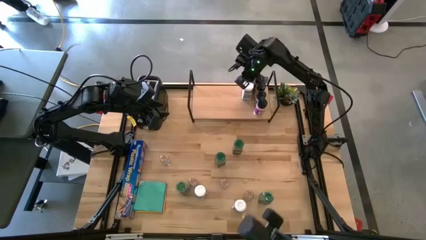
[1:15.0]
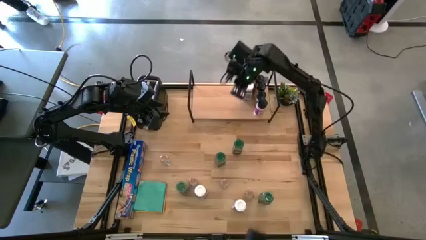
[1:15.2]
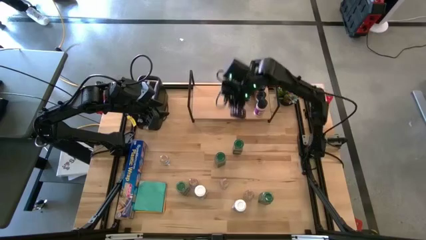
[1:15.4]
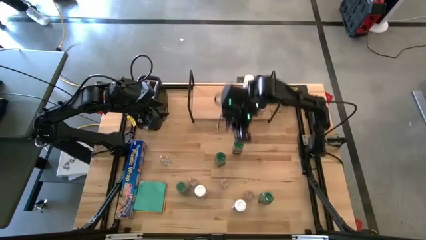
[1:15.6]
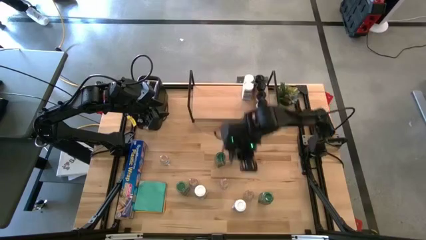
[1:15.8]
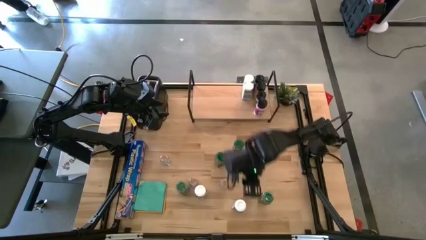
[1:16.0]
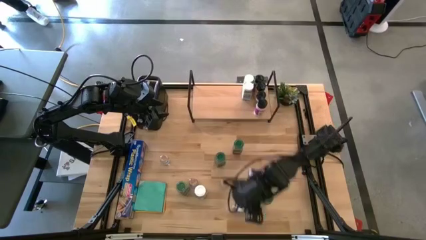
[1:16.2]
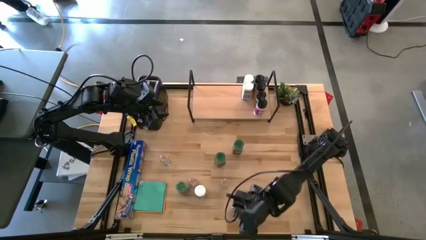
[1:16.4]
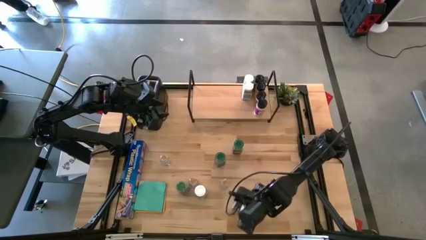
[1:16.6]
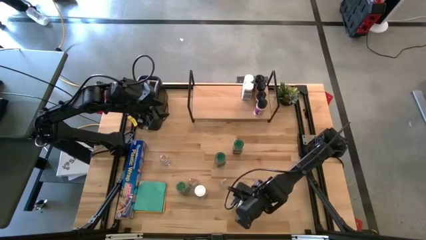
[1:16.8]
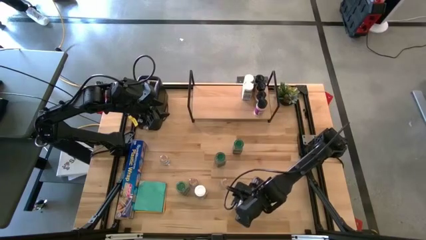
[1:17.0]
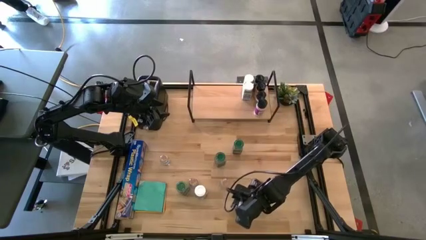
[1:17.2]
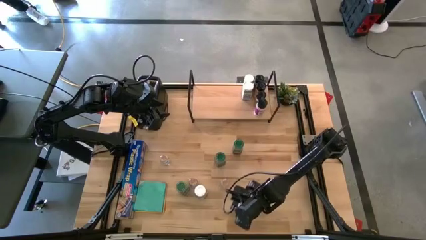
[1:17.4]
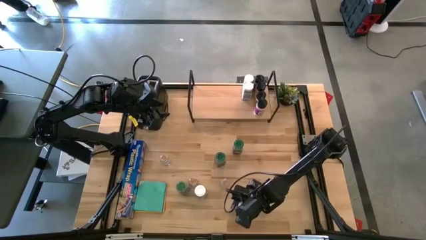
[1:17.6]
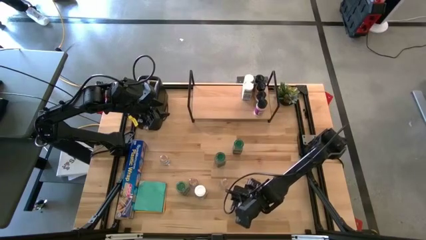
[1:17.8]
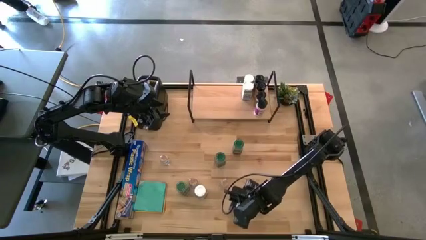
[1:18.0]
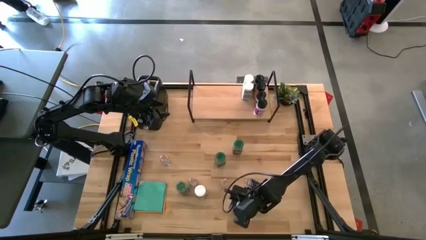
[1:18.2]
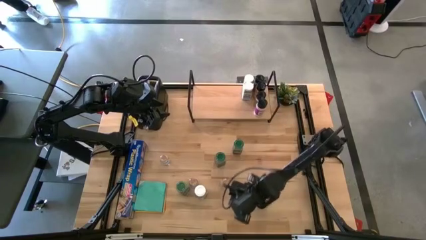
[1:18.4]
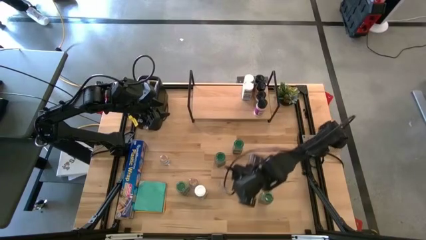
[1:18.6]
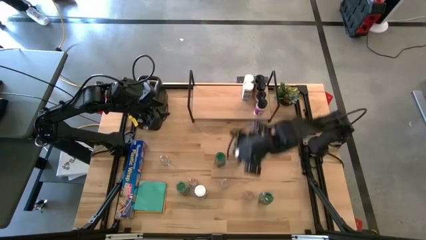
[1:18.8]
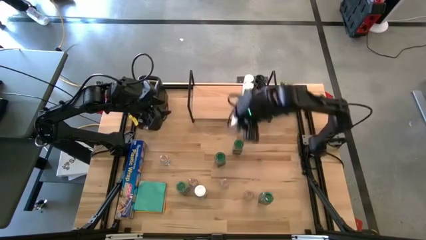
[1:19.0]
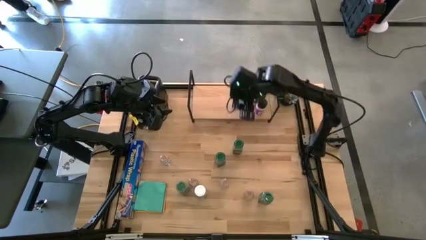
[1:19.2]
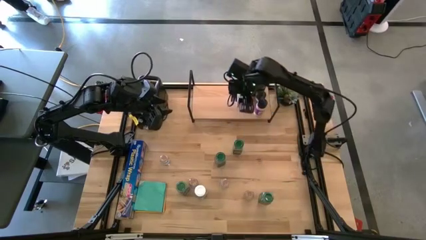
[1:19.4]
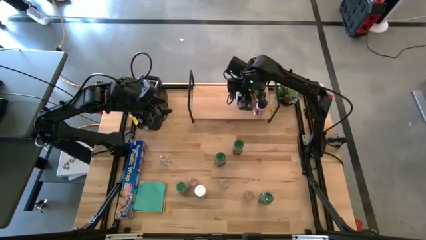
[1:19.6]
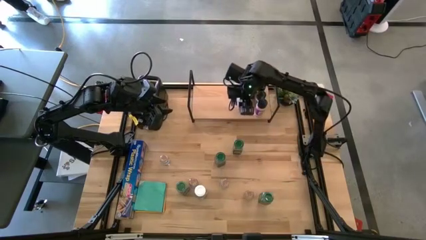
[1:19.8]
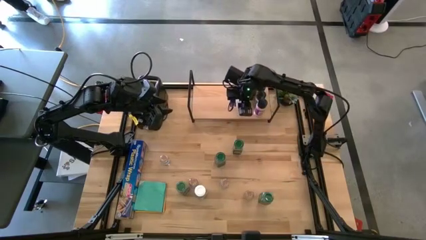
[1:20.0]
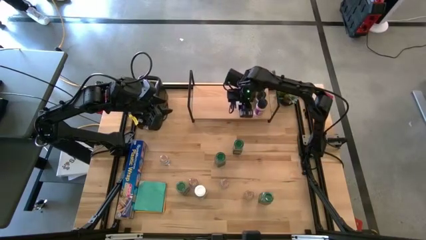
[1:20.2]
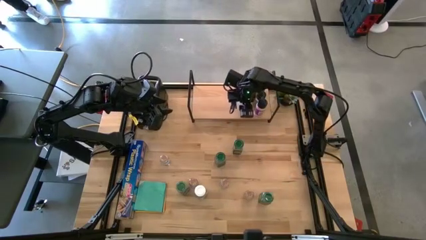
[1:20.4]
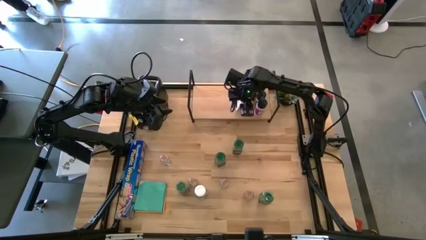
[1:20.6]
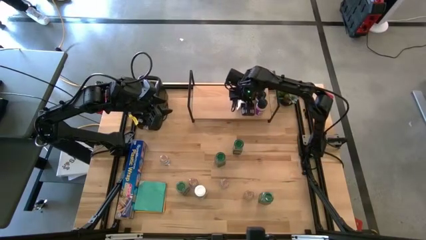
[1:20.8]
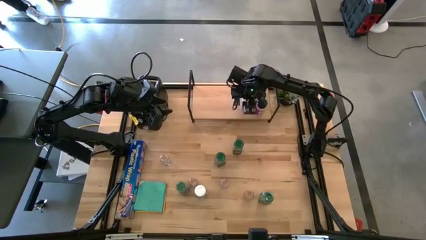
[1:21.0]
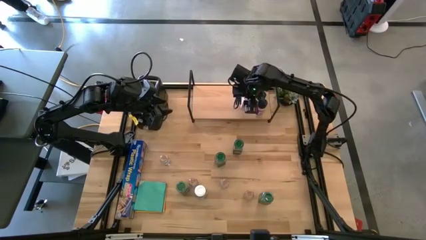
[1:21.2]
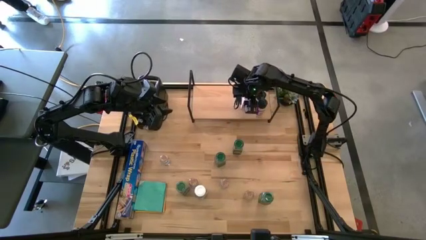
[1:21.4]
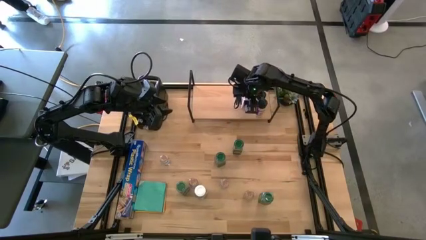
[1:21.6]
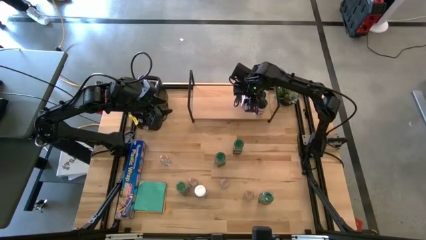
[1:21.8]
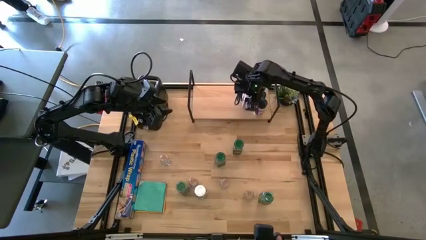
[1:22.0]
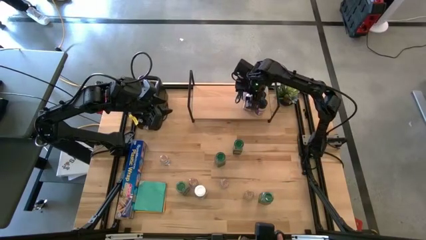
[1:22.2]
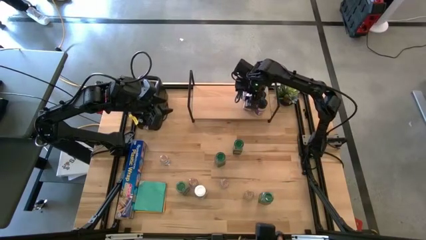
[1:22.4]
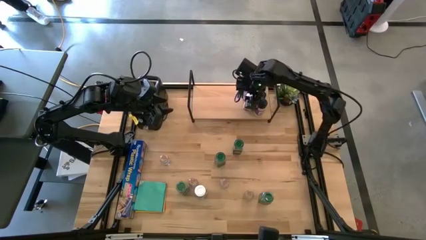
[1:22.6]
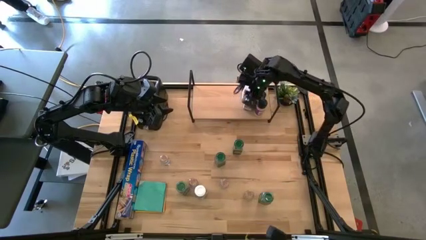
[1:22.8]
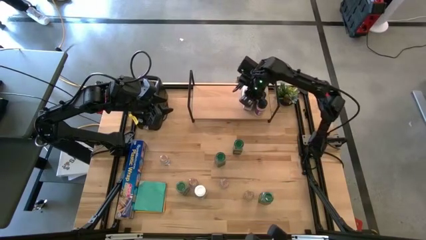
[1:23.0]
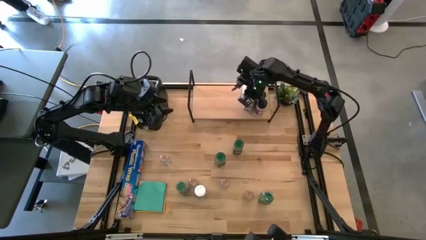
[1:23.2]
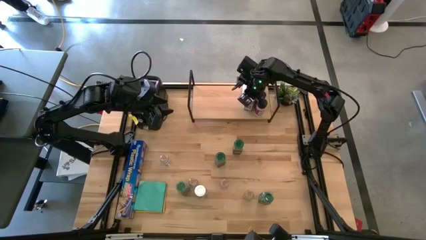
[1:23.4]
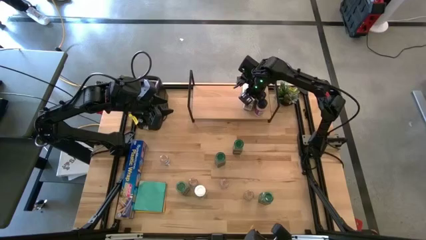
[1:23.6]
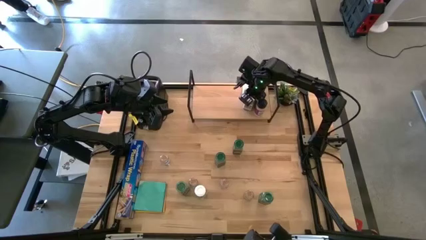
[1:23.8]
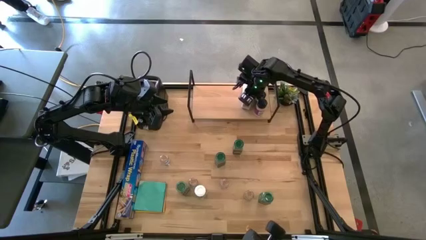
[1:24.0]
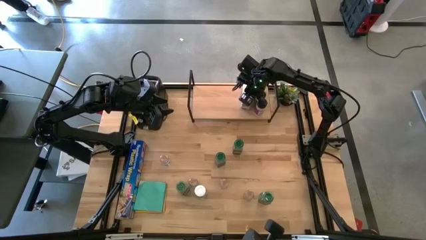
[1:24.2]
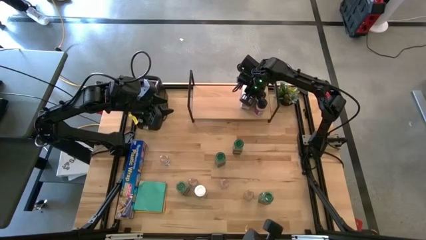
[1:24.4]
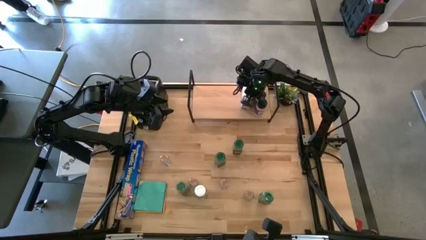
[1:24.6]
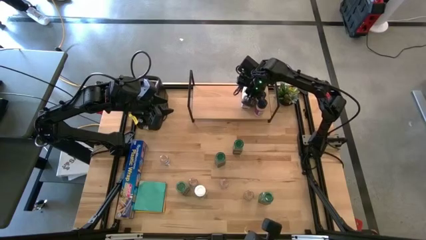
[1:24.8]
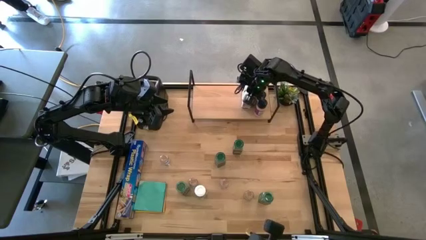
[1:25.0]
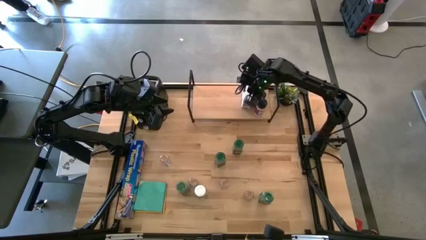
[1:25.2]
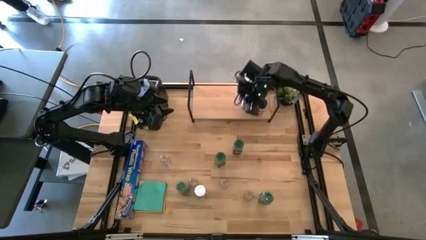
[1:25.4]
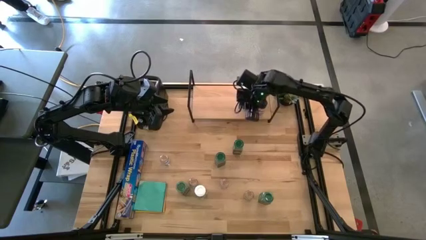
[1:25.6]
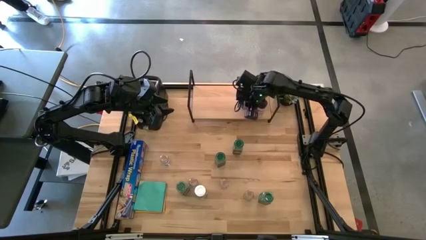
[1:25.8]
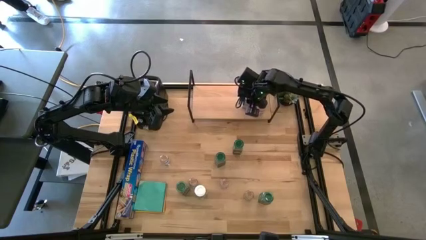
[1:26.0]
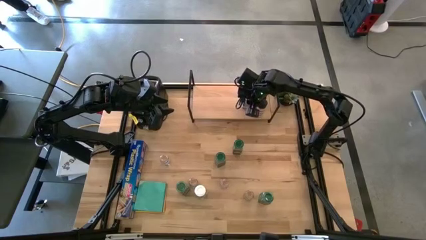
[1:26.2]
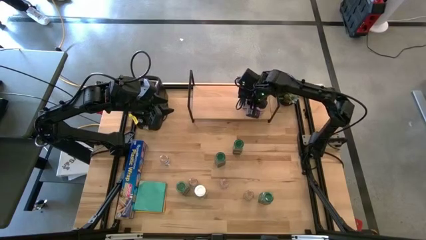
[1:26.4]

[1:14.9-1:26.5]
Task: Shelf spices
Put the right white spice bottle on the shelf and align with the other white spice bottles

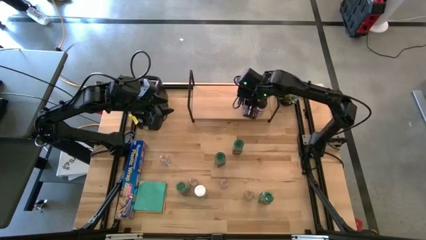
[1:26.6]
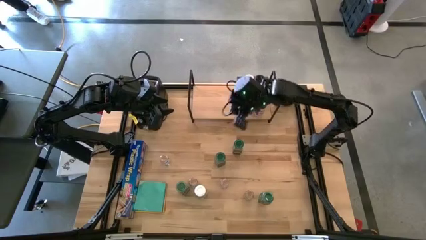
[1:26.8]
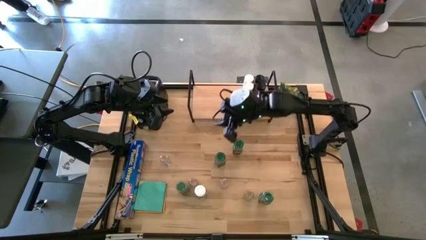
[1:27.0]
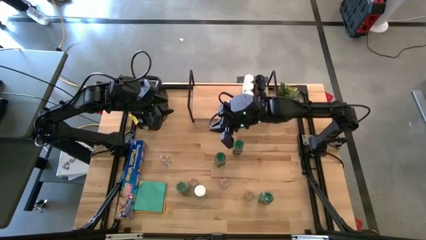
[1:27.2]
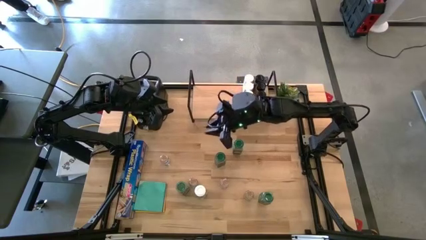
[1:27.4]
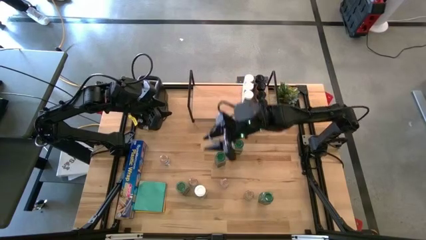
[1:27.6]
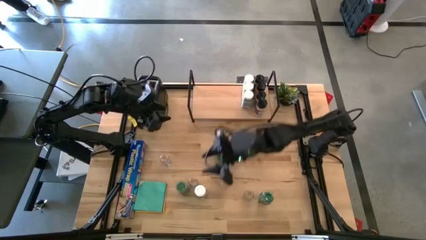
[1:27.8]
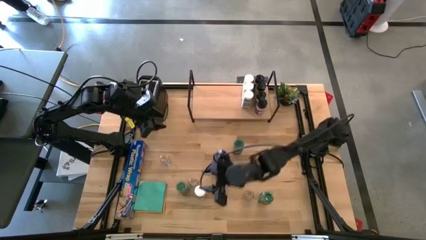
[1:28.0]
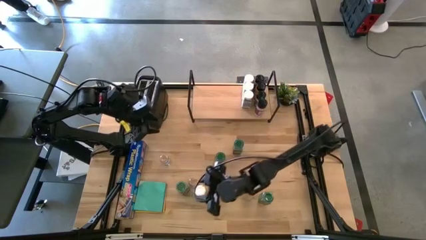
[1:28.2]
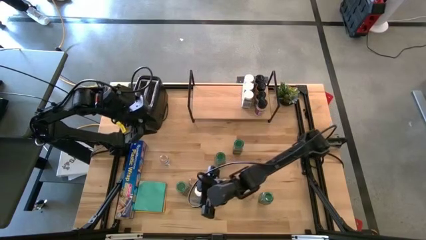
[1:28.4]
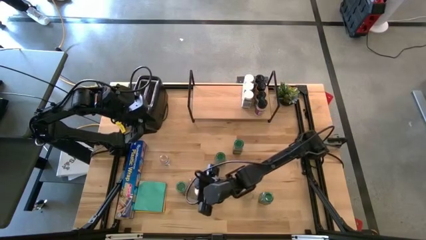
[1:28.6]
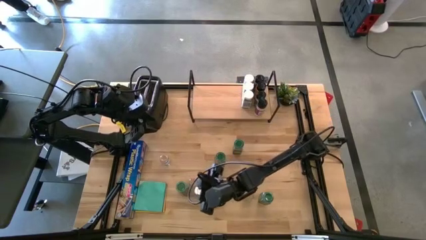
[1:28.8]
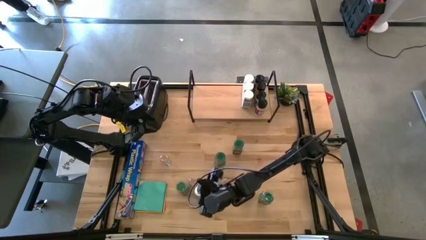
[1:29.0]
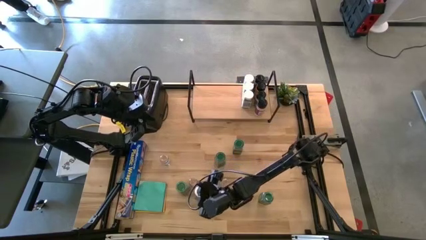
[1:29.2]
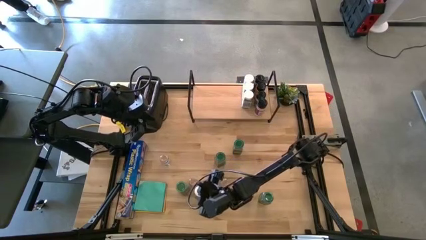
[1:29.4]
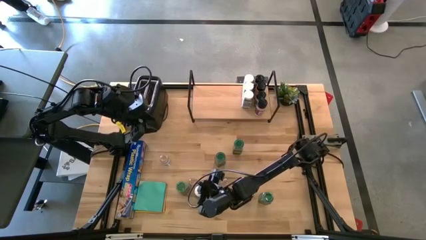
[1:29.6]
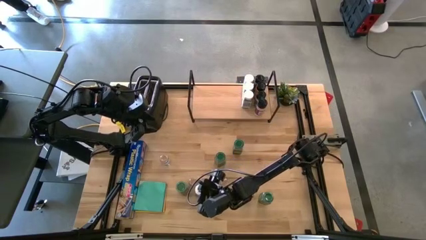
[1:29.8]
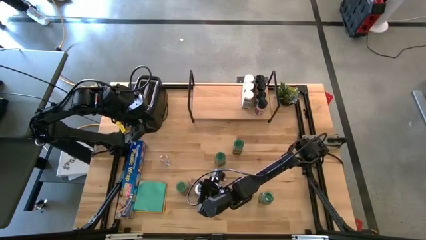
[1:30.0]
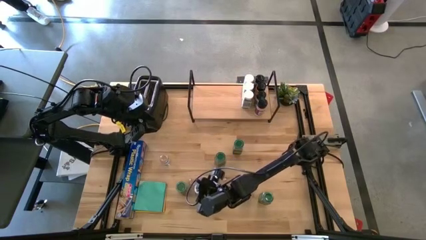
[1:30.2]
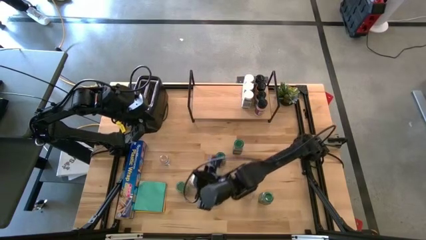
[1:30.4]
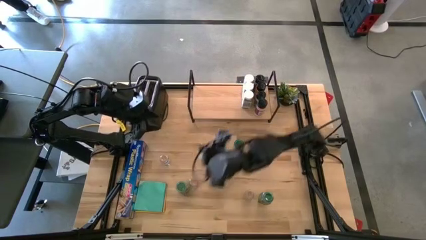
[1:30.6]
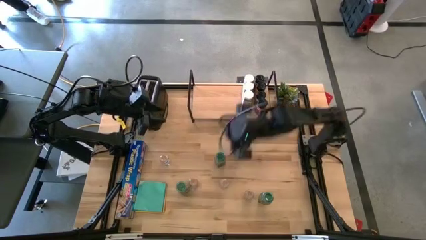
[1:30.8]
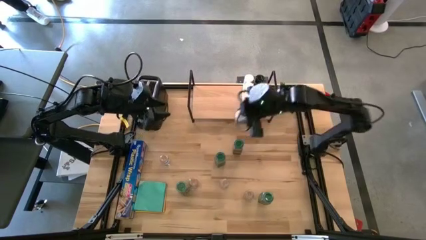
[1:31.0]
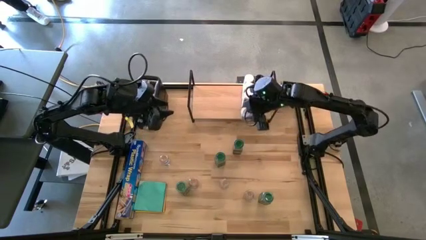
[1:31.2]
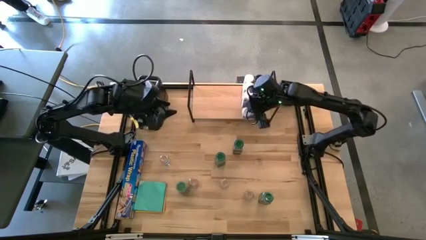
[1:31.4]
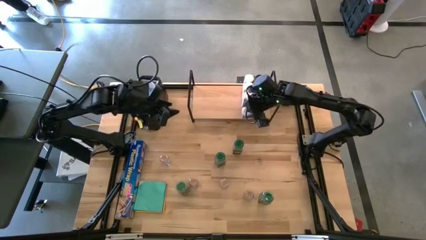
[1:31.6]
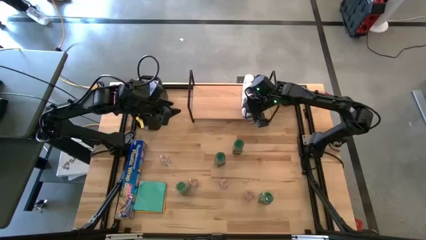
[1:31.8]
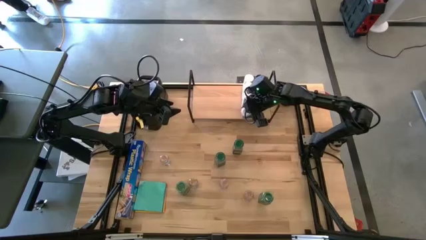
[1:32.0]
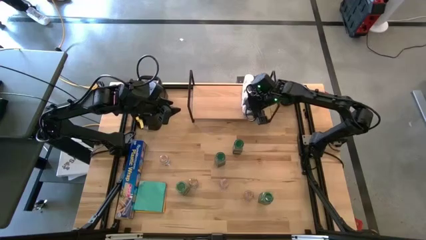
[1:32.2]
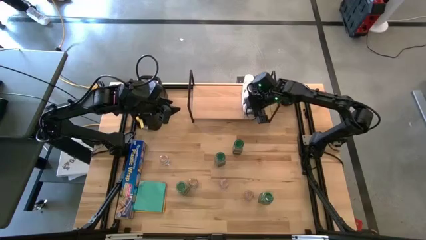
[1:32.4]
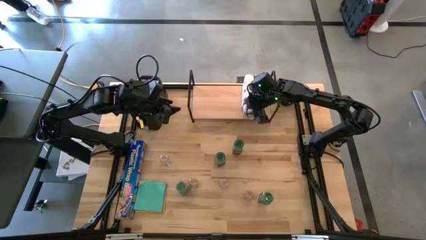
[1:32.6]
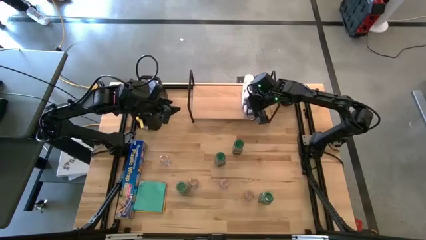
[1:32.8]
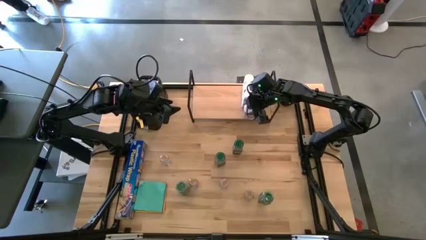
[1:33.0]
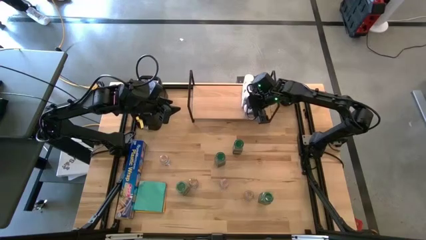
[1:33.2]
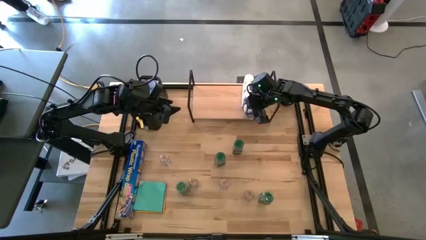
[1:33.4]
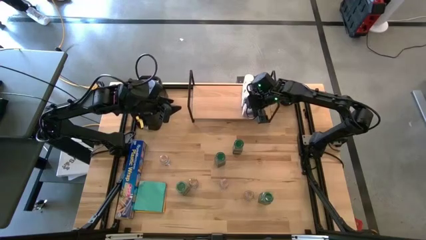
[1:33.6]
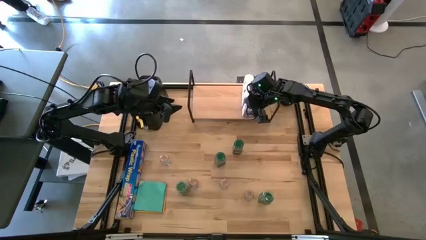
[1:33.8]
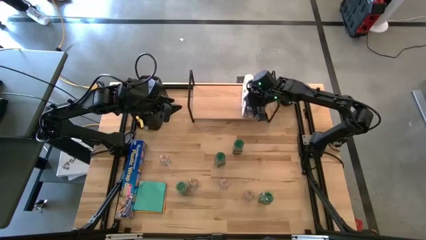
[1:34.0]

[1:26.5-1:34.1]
Put the white spice bottle on the shelf and align with the other white spice bottles
